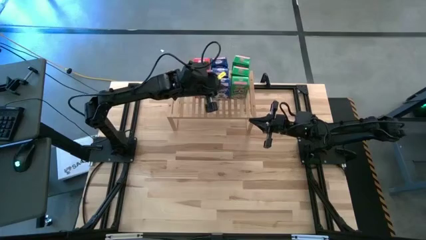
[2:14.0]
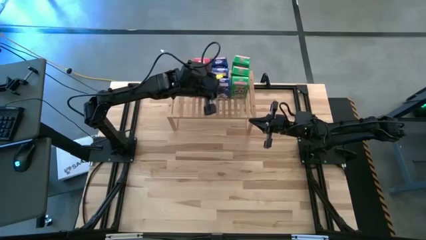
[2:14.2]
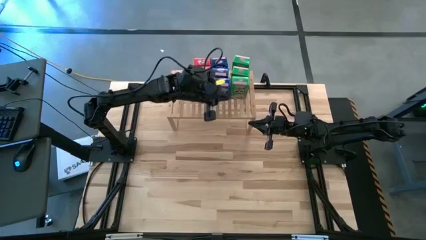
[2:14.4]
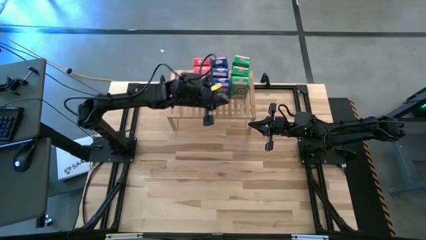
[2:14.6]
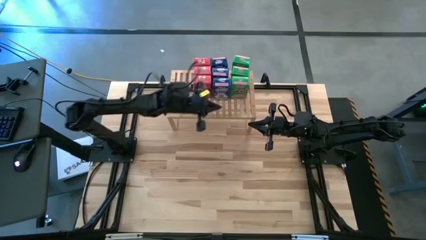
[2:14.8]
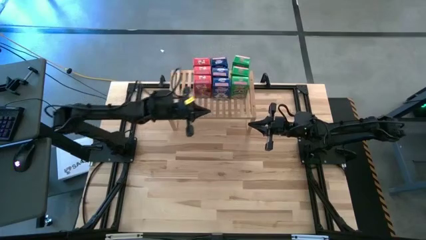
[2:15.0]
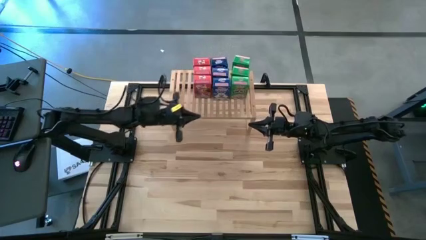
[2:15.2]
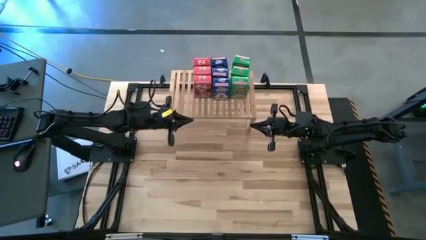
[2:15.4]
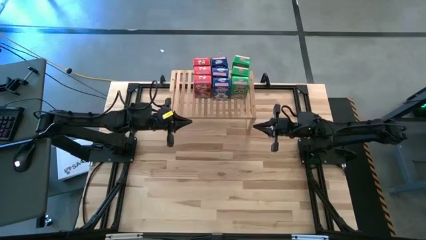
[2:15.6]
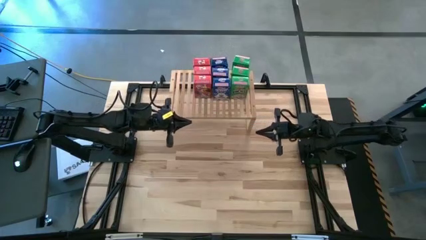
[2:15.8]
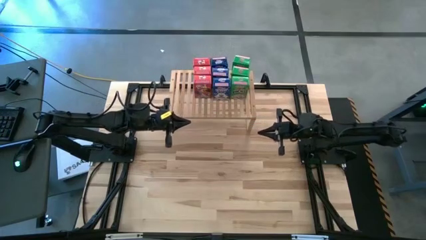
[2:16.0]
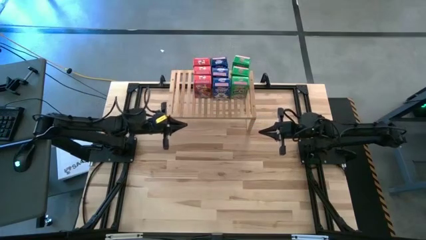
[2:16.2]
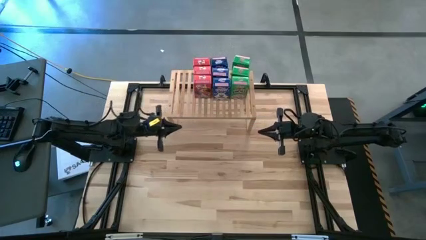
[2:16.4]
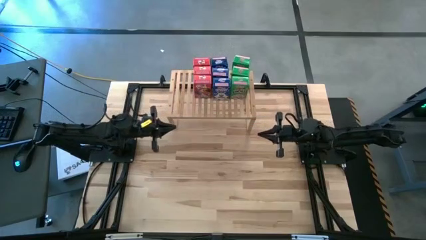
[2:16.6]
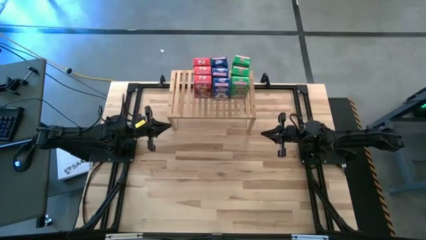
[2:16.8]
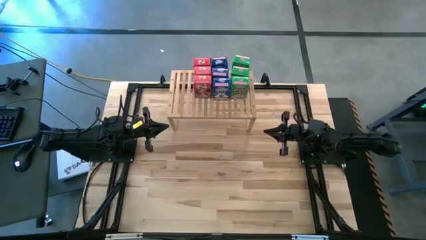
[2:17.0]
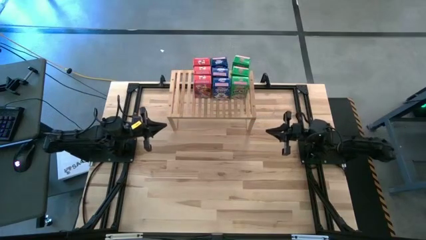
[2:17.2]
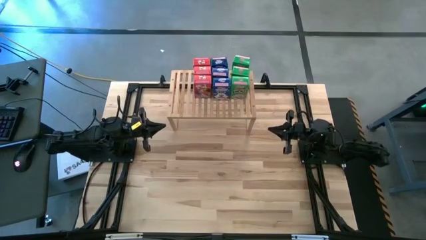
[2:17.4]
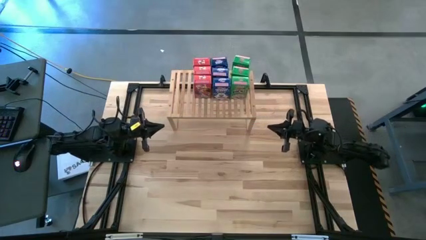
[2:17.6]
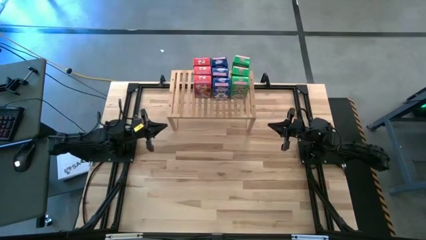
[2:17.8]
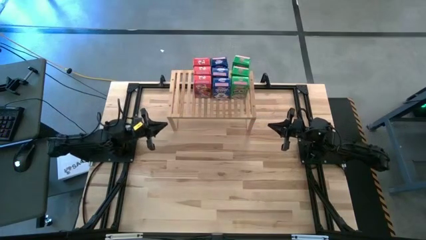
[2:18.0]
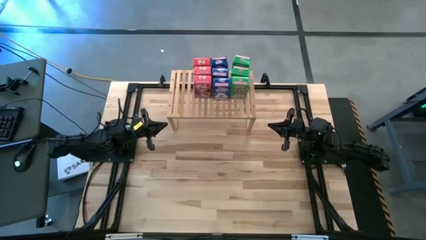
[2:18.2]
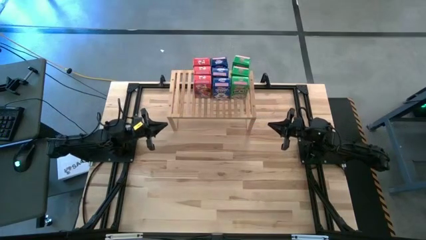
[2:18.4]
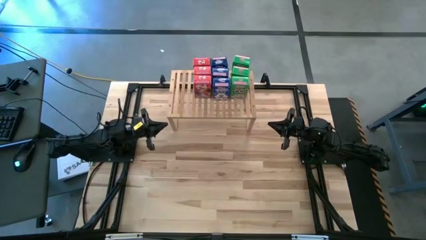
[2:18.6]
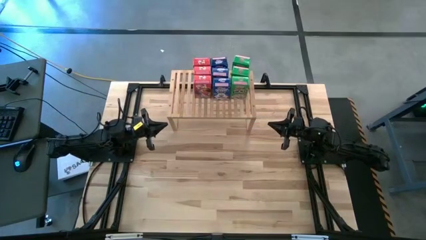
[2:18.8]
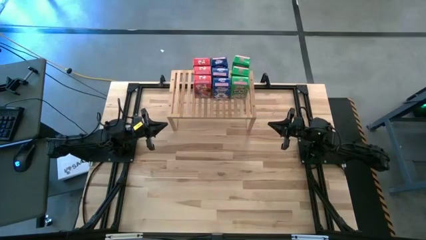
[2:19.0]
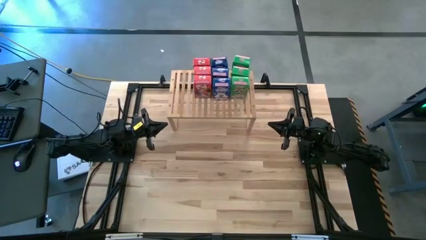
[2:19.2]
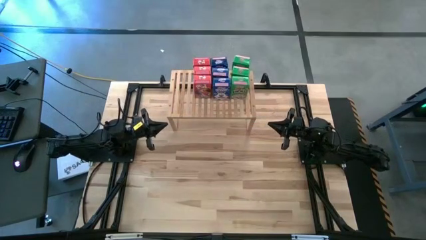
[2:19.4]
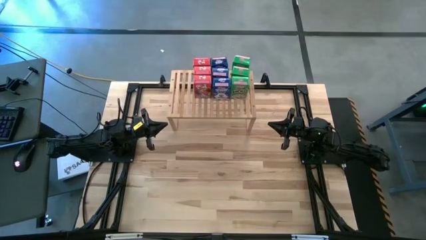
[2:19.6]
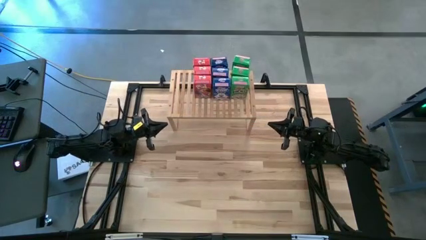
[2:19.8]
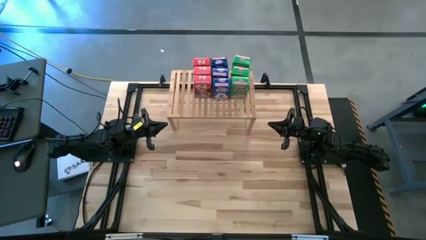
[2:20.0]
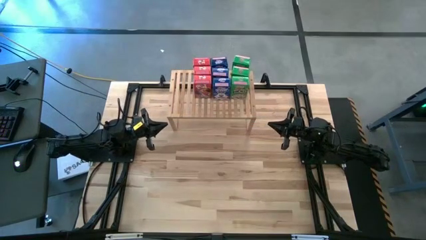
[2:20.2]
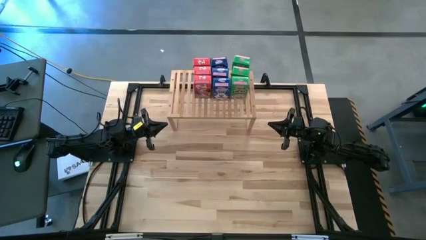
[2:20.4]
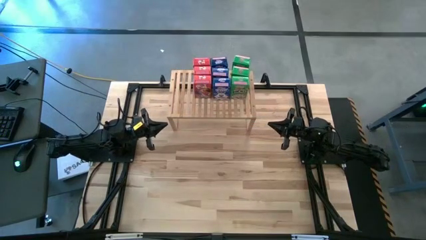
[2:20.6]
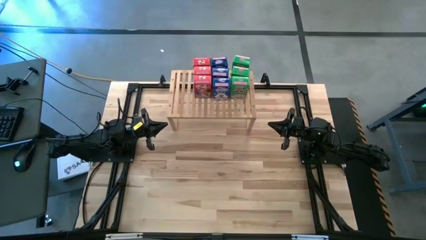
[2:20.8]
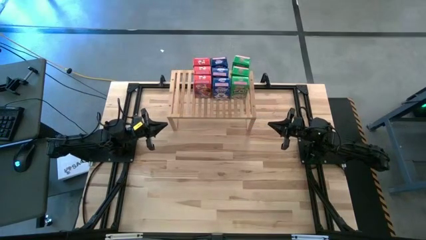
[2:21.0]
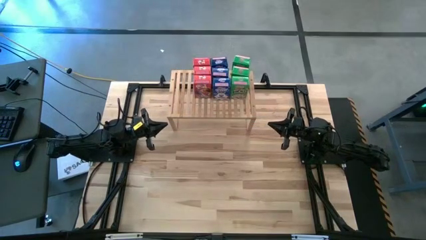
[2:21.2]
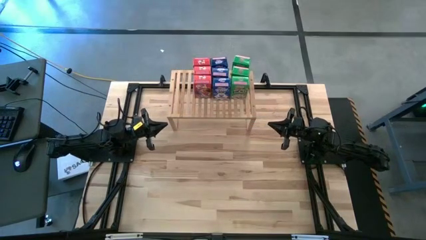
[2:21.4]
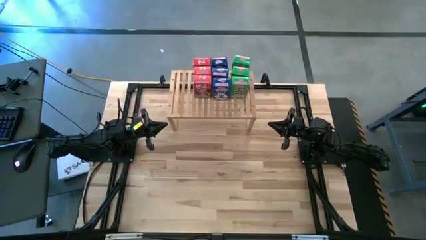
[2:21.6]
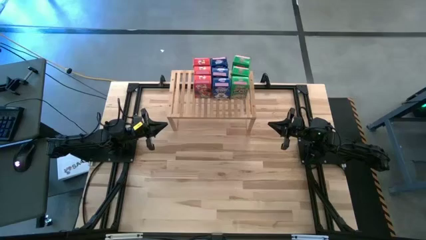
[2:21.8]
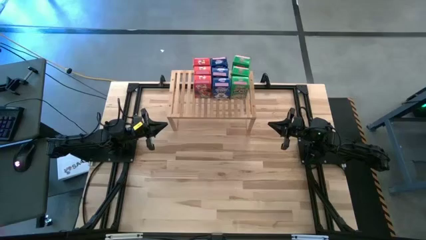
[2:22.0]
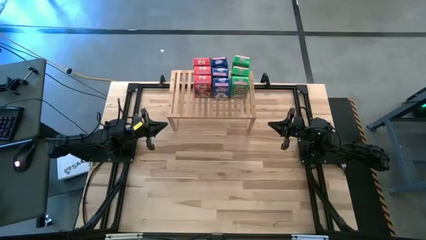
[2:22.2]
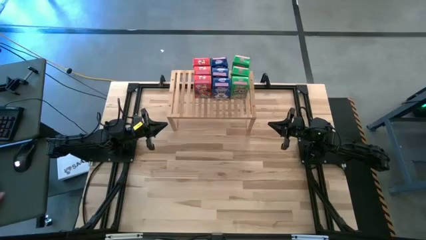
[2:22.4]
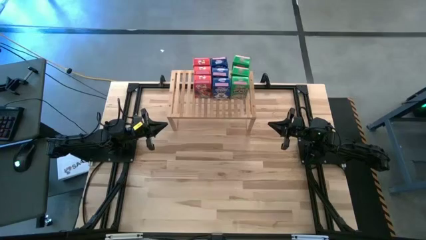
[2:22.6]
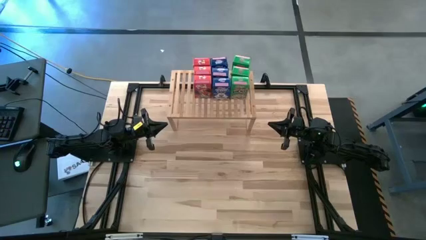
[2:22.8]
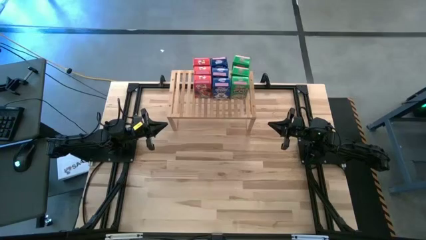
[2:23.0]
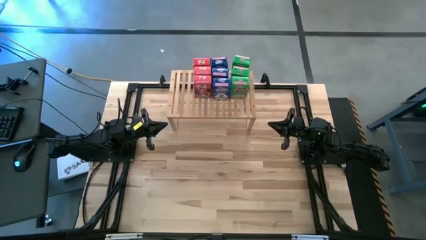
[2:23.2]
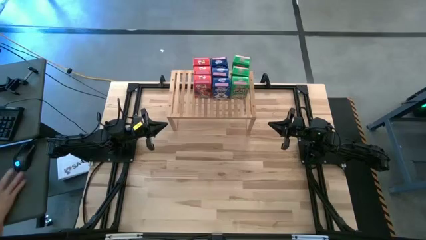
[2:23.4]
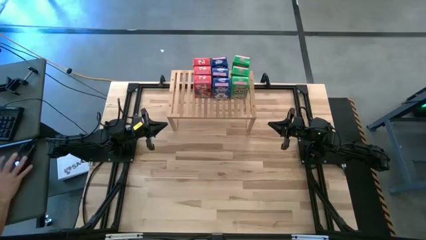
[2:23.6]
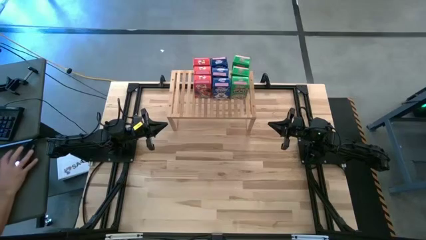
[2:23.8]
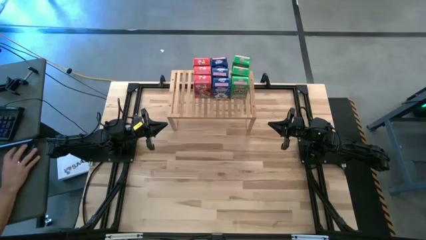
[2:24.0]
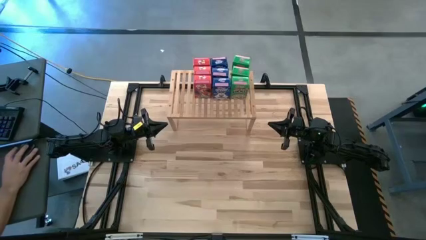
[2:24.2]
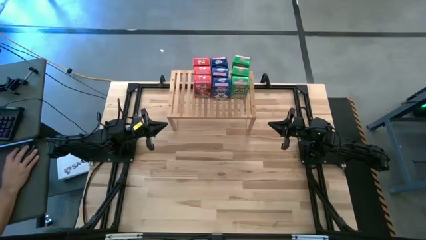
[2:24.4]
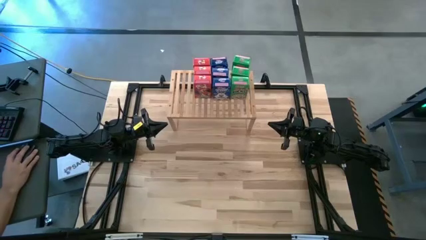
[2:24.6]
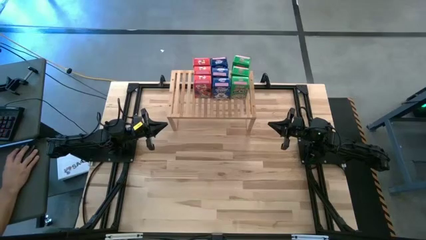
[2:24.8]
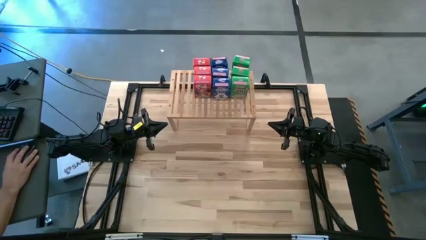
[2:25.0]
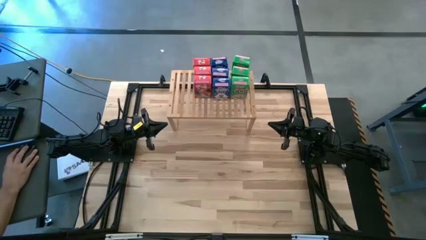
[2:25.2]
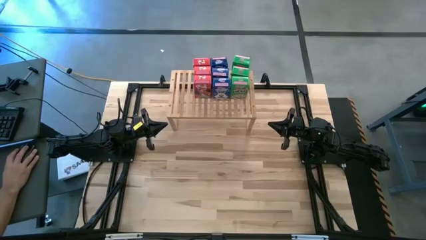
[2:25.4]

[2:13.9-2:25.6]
Task: Stack cereal on shelf
Return to Home Position

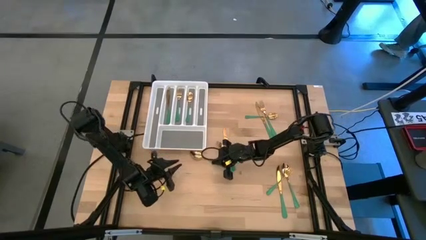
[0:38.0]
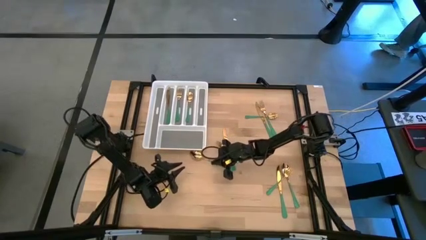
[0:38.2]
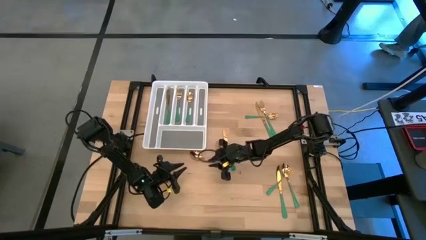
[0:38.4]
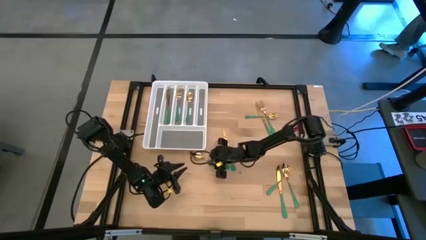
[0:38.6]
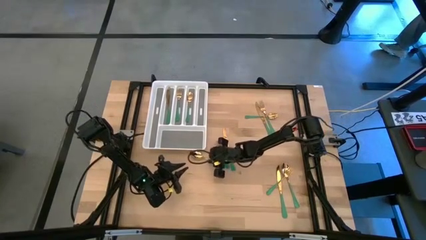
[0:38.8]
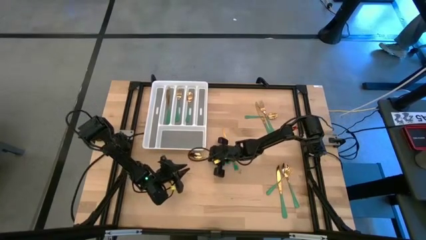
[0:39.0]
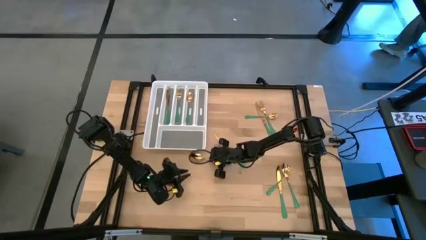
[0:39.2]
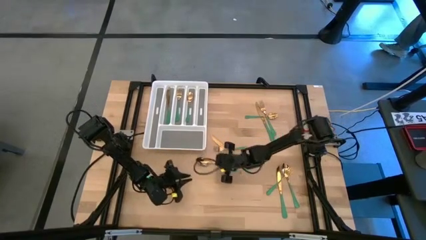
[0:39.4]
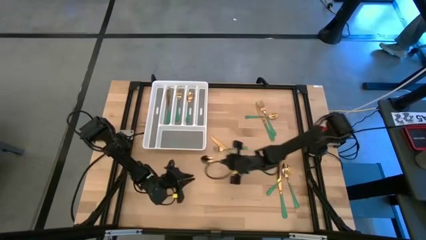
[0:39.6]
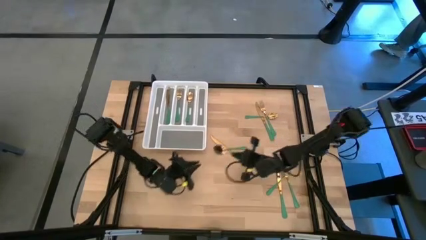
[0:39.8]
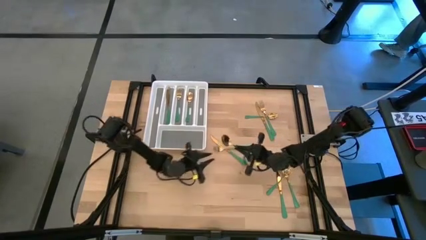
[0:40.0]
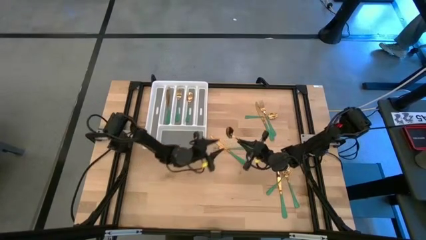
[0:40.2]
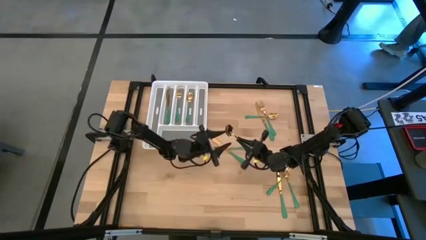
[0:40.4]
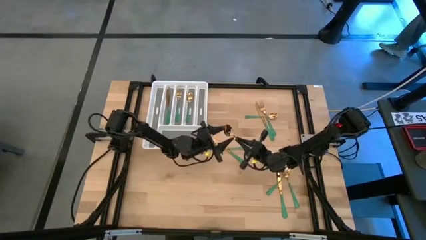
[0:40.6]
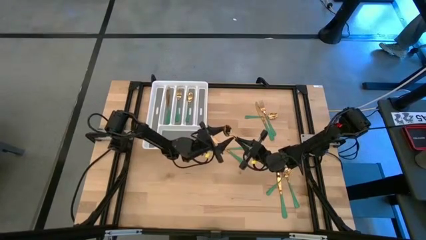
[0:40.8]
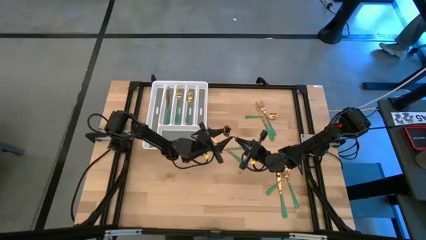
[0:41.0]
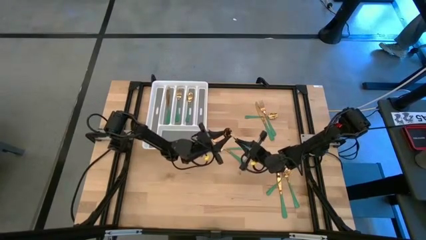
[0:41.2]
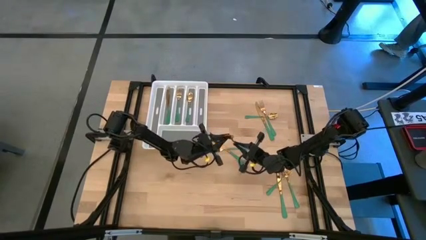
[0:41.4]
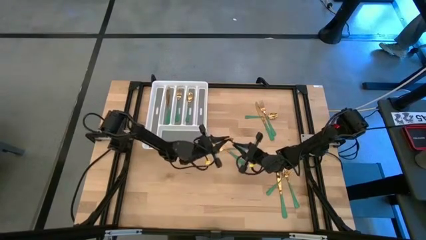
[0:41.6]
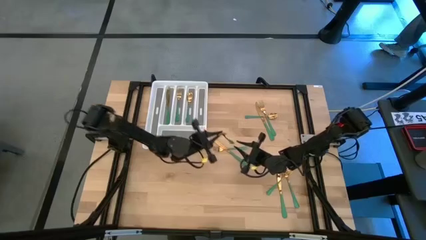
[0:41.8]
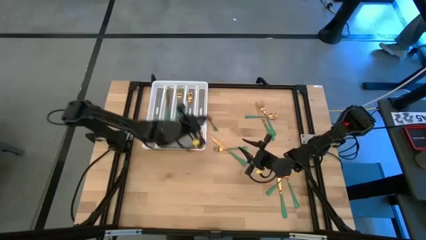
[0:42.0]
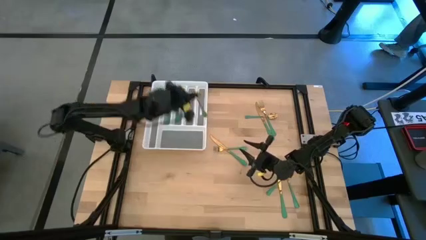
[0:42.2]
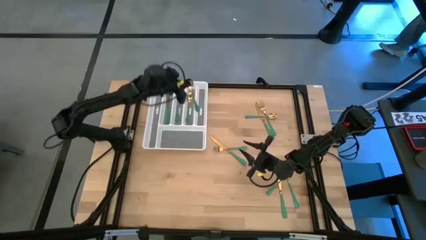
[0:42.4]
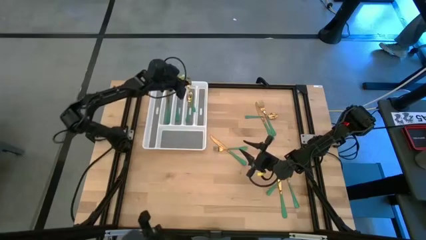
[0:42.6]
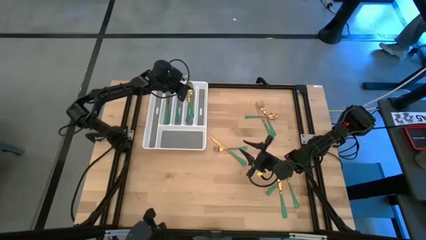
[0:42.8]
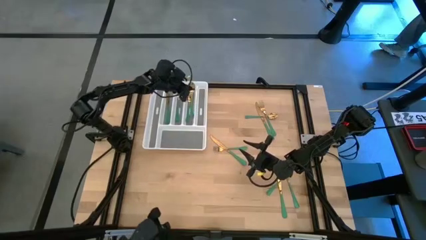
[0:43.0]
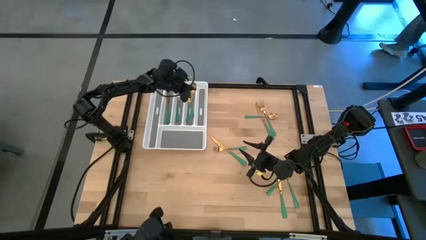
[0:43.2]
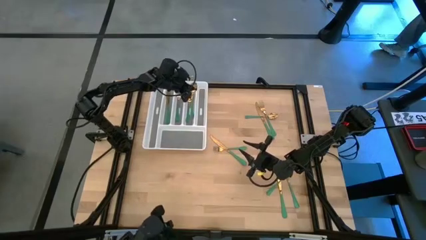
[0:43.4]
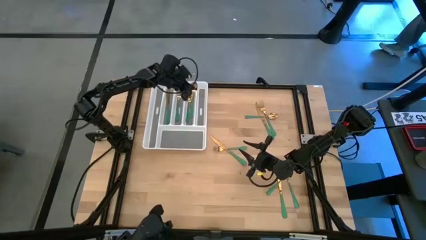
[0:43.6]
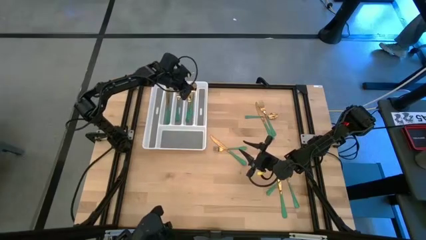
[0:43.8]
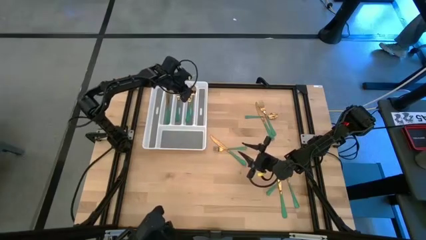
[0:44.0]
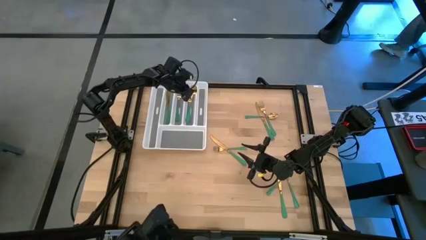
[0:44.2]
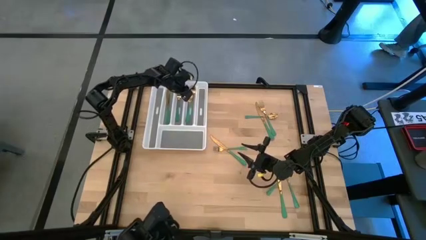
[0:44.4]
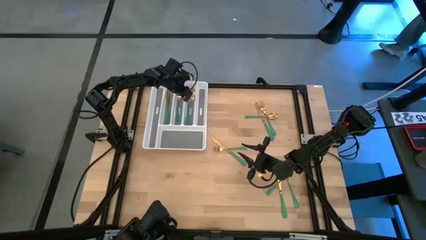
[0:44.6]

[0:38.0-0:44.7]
Task: Sort silverware
Put the green spoon into the white cutlery tray
